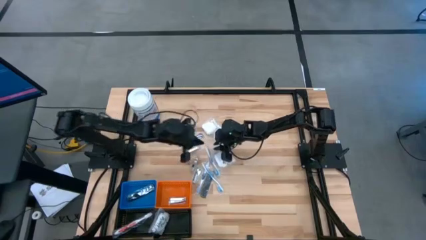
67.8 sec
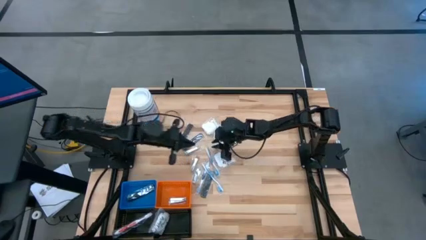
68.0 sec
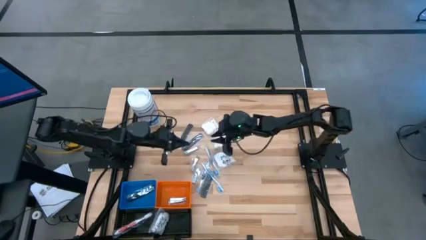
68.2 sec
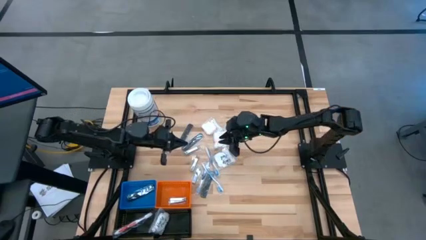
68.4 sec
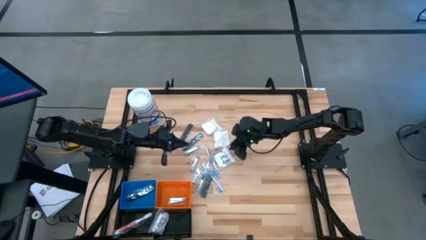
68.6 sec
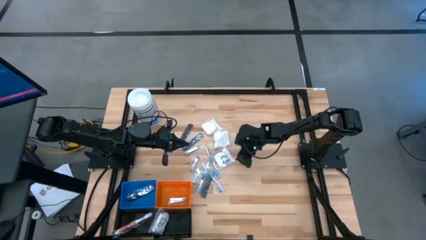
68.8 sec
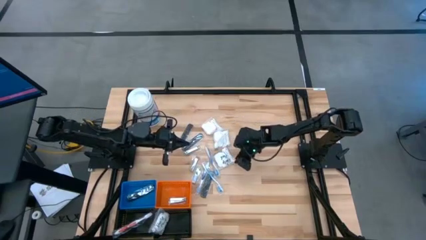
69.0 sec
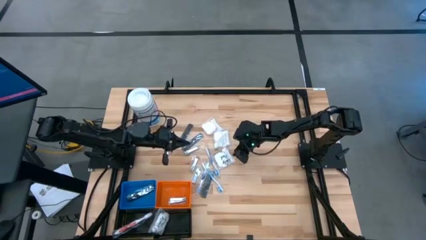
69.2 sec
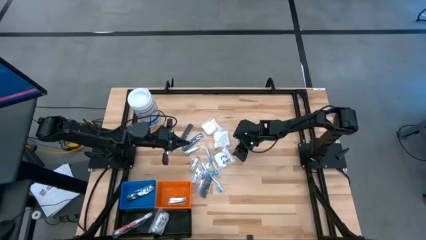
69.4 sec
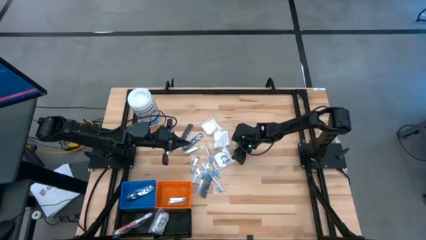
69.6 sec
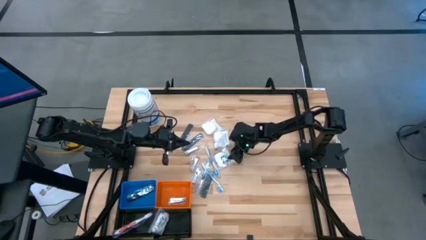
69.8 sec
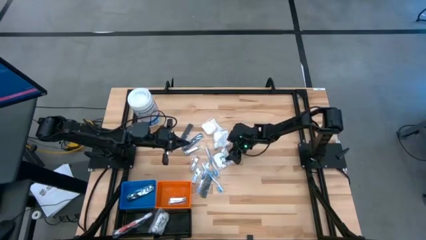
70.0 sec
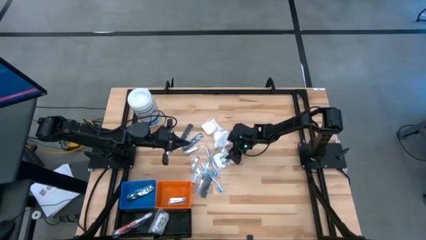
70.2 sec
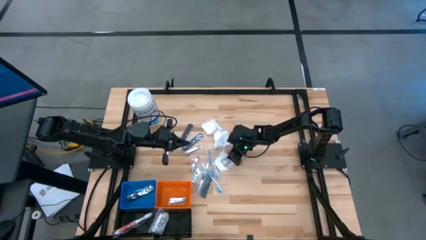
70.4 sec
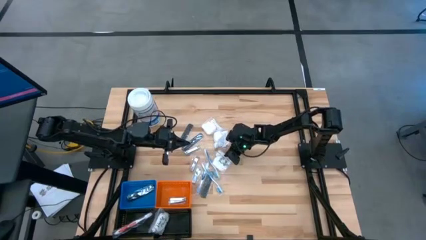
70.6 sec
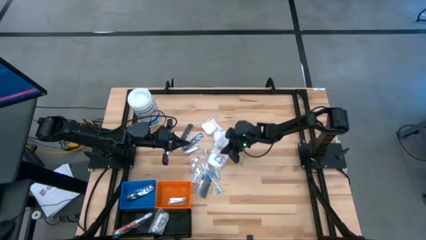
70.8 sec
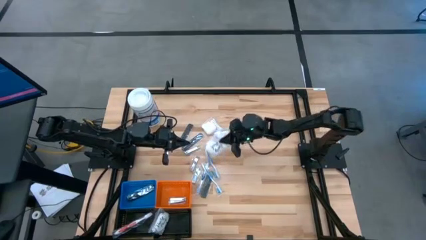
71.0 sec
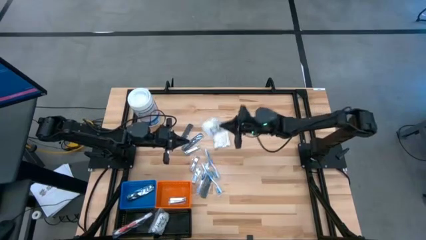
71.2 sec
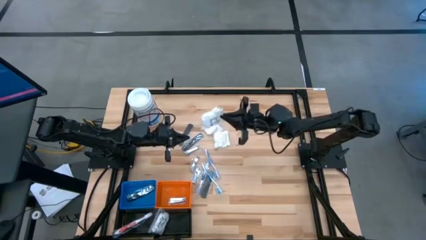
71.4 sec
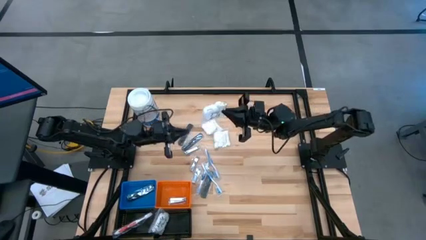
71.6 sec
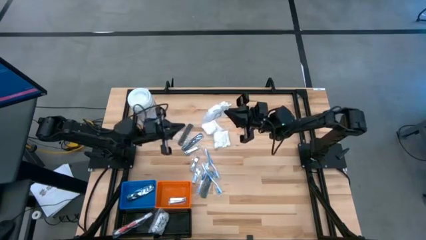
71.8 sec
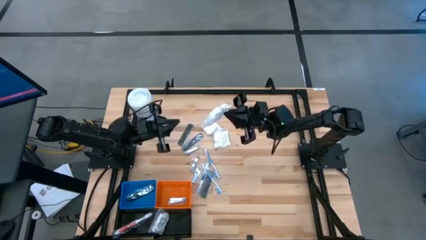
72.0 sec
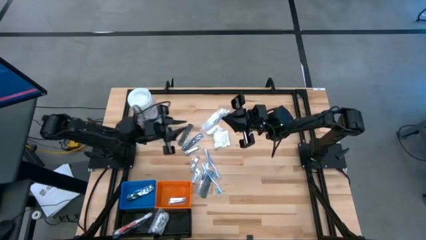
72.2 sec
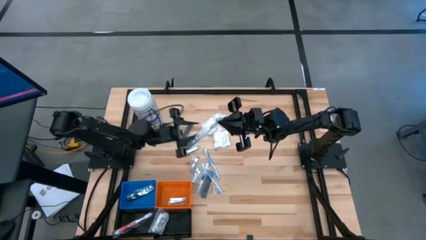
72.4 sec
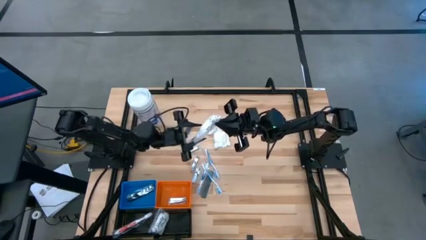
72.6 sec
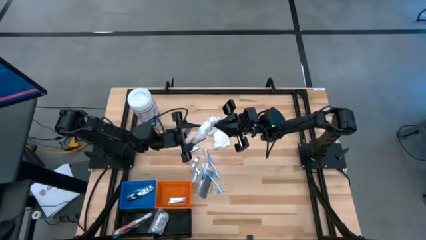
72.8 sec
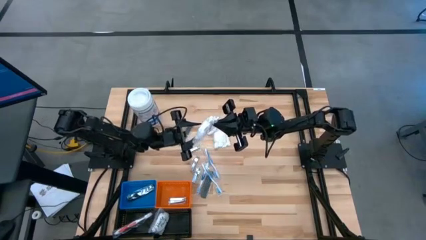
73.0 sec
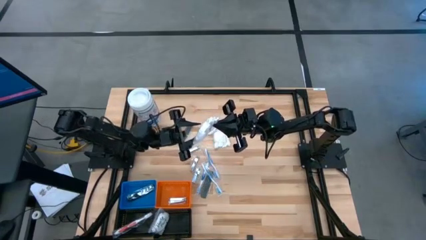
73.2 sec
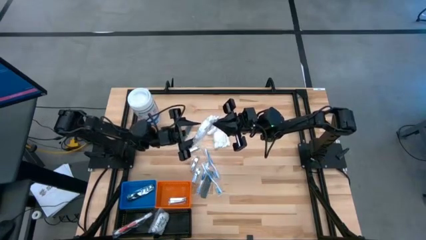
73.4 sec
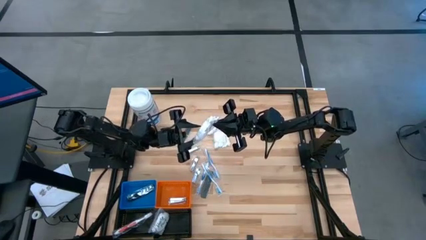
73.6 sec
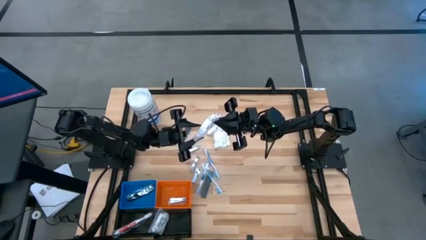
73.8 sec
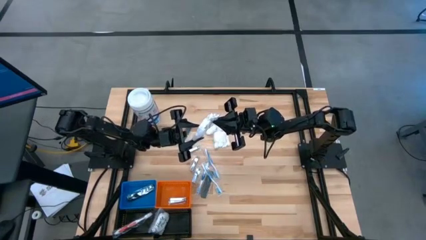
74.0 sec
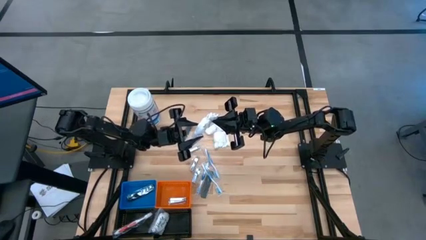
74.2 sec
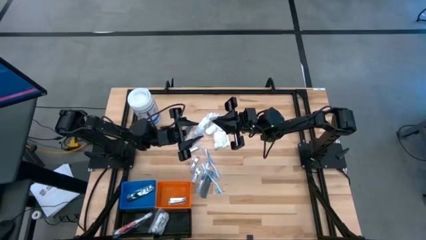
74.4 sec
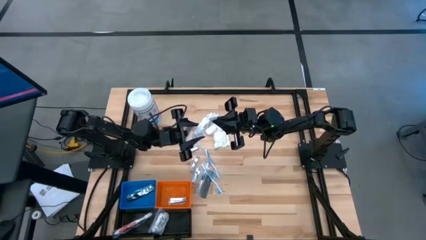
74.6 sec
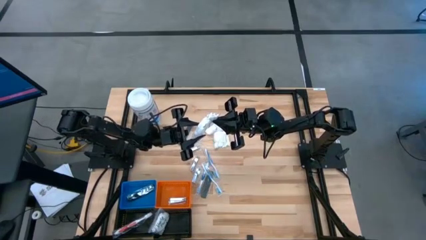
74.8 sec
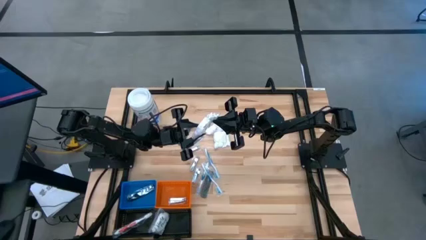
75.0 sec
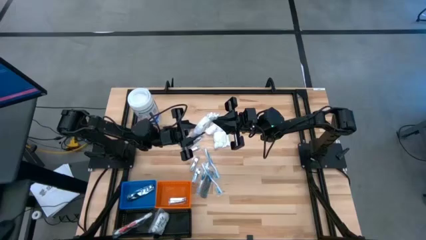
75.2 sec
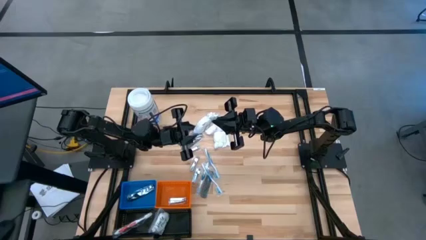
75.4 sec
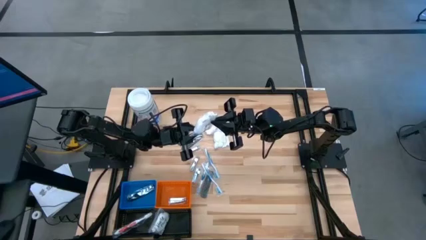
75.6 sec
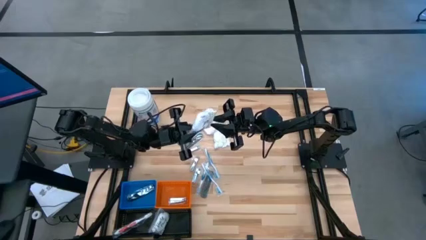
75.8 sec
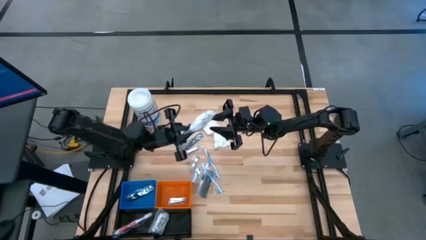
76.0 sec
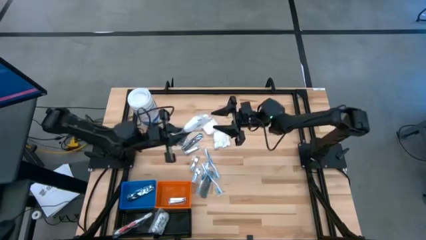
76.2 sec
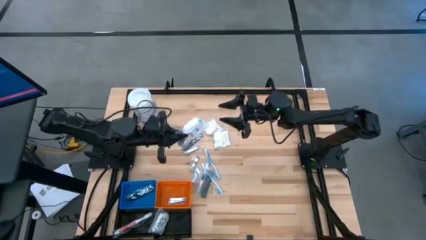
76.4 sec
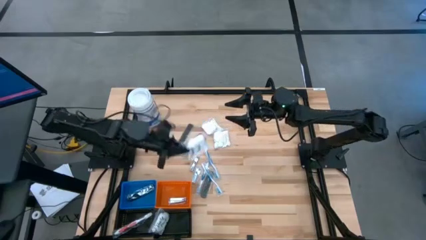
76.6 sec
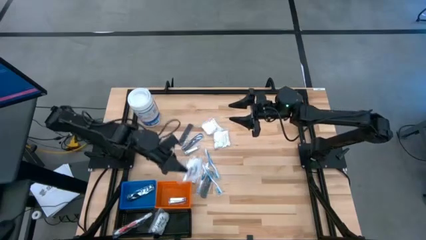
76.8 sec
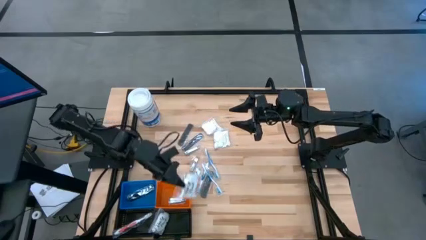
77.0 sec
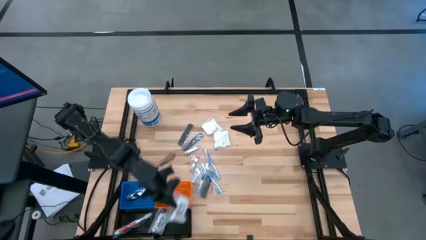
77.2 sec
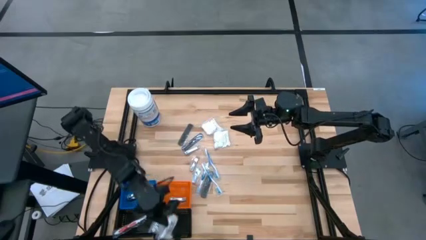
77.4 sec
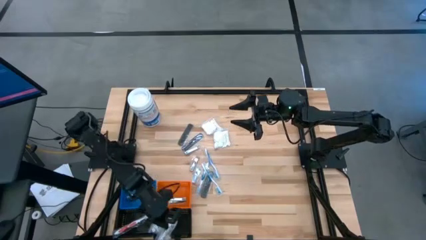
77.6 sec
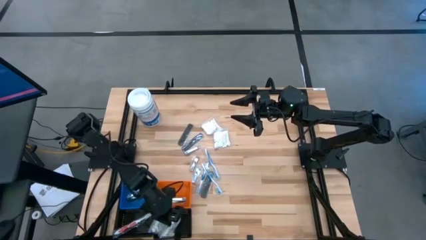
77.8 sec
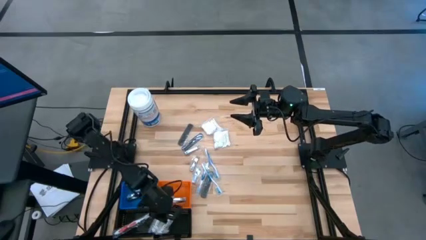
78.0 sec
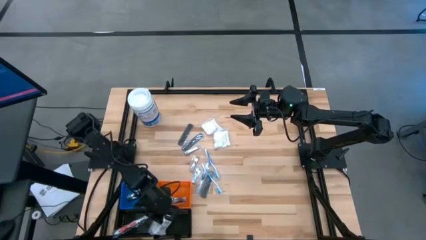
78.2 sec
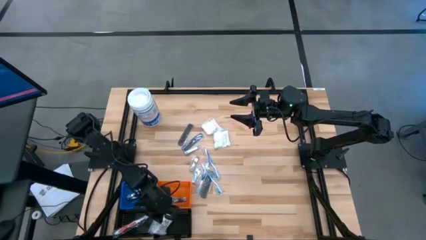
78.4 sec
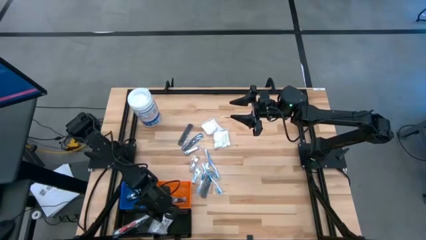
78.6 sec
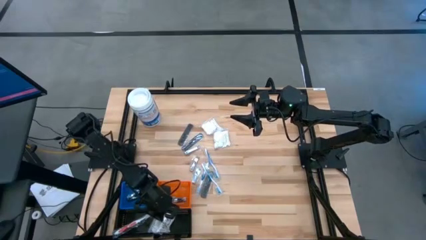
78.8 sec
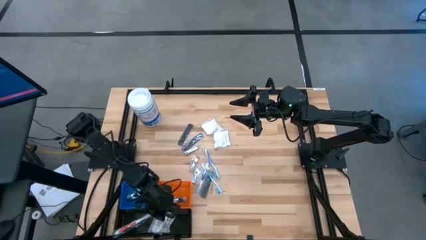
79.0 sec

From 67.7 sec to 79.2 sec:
Task: Pick & Place Travel size toiletries
Put the bottom cotton pack into the right black basket

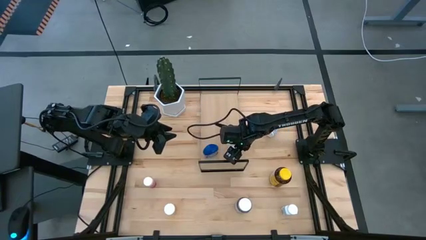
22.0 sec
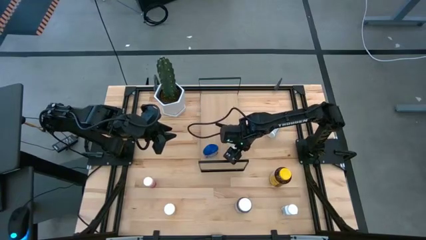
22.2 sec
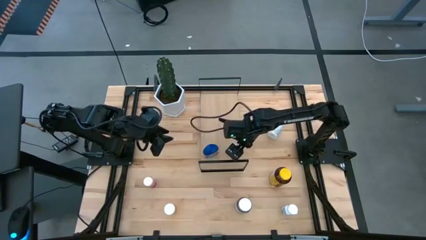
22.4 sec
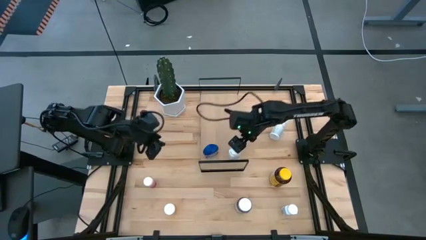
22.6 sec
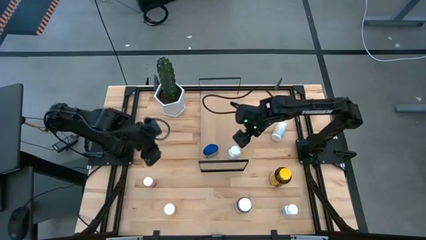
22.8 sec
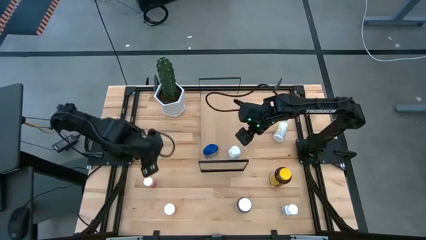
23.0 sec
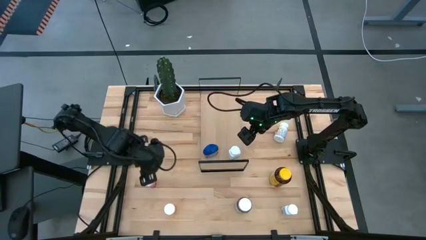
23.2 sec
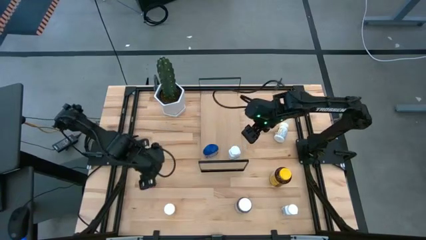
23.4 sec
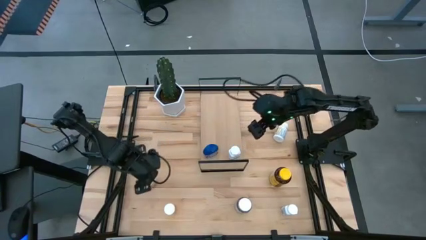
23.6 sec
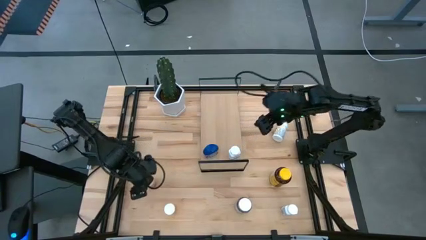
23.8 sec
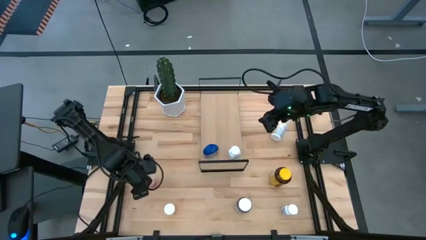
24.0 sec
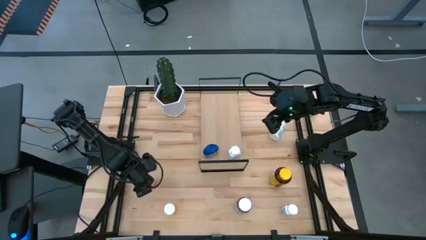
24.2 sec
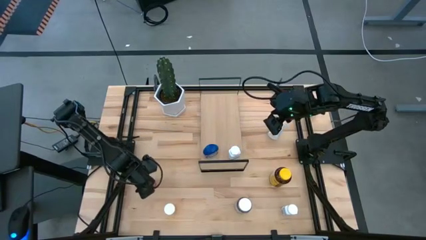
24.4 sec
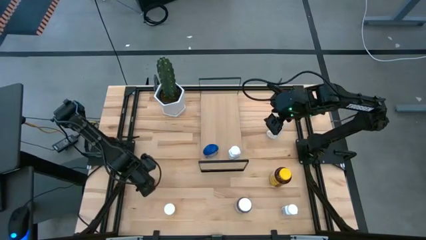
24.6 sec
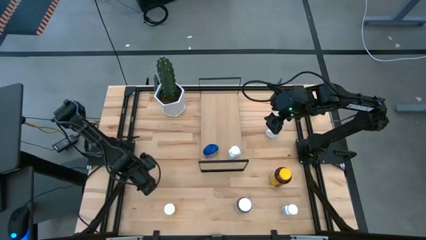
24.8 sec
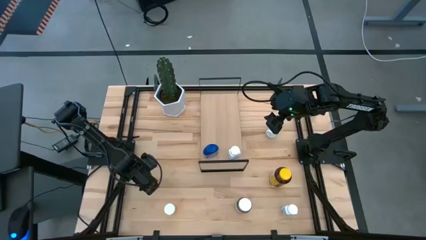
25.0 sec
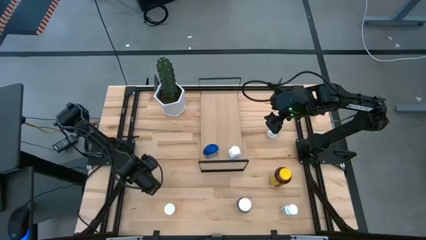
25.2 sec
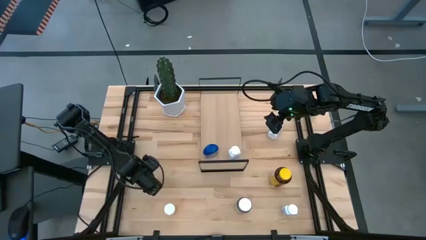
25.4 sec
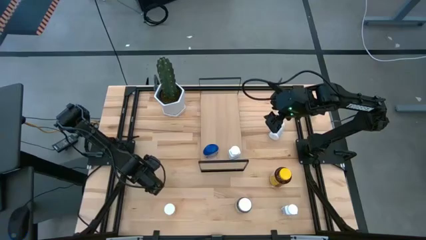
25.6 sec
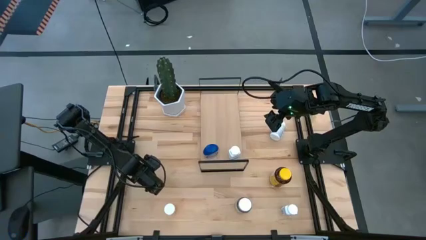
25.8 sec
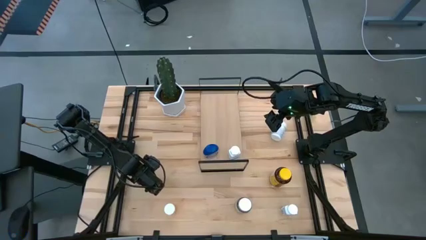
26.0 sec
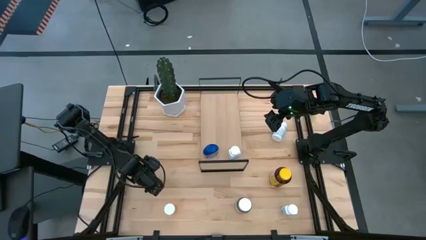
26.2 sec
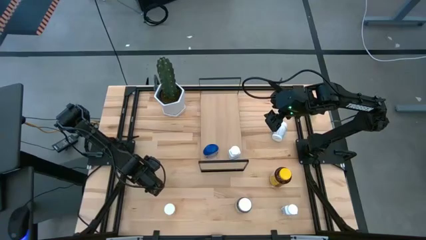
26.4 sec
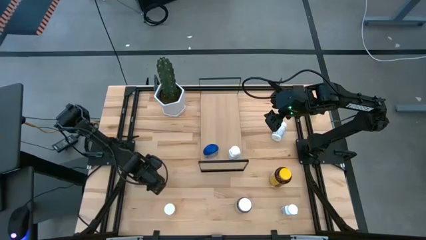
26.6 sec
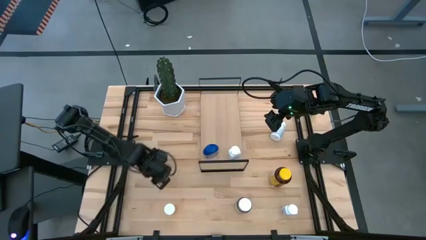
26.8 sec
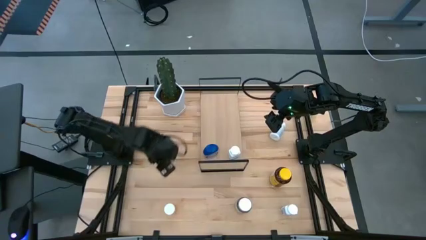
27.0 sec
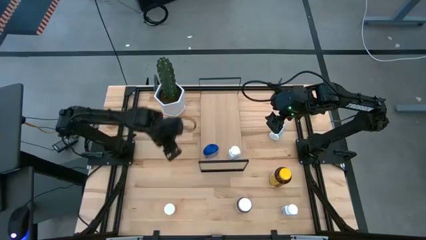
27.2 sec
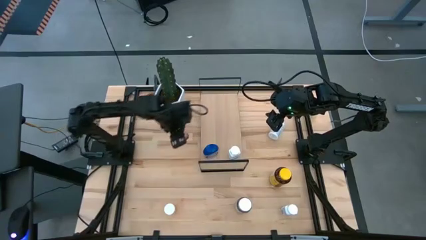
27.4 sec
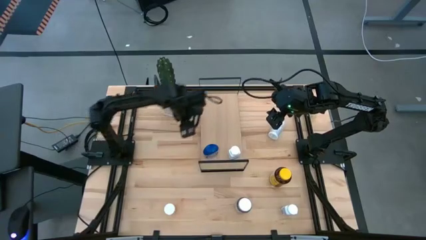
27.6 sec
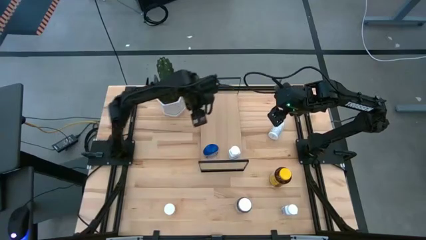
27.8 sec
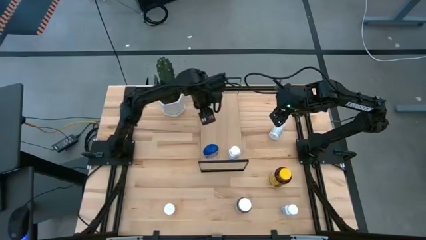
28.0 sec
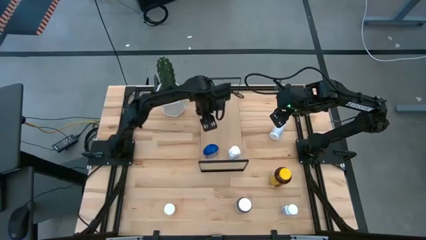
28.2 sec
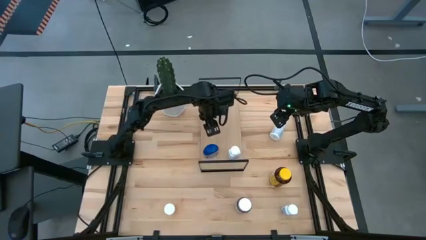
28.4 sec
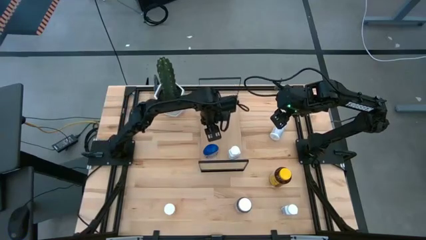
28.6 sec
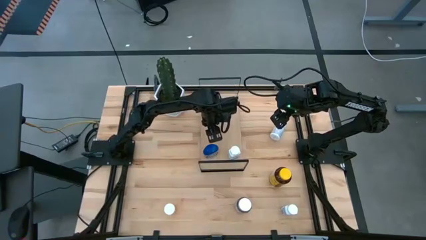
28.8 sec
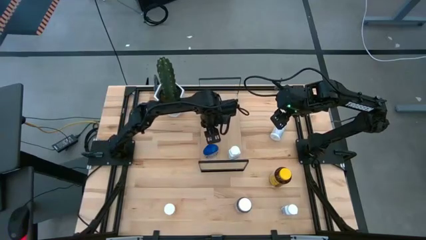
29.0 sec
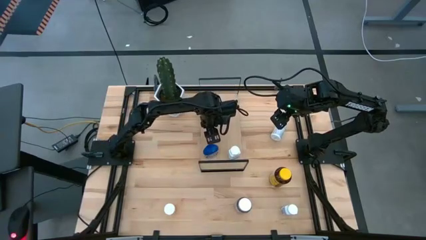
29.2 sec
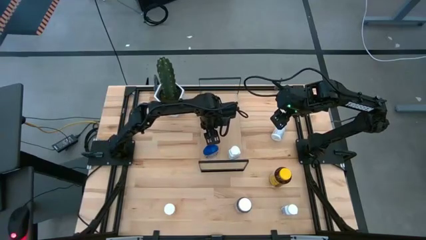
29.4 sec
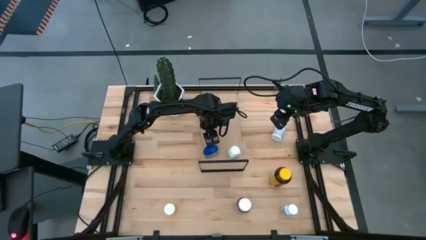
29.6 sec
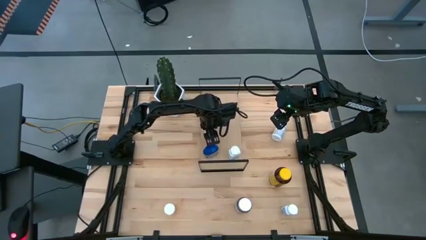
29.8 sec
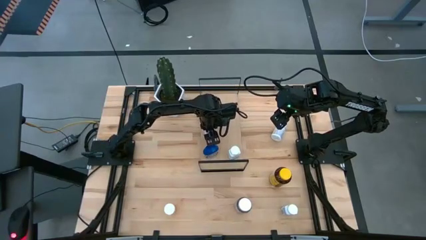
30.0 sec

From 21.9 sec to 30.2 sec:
Task: Pick and place medicine bottles onto shelf by color
Put the pink medicine bottle on the shelf
